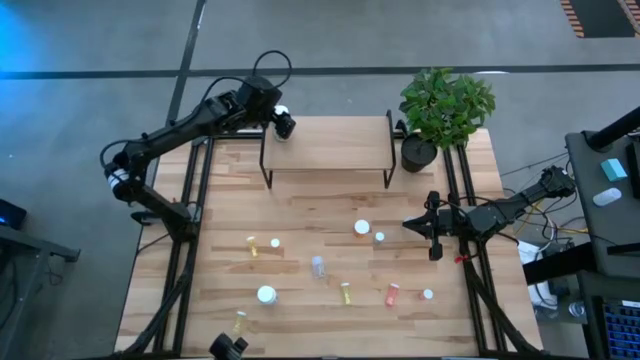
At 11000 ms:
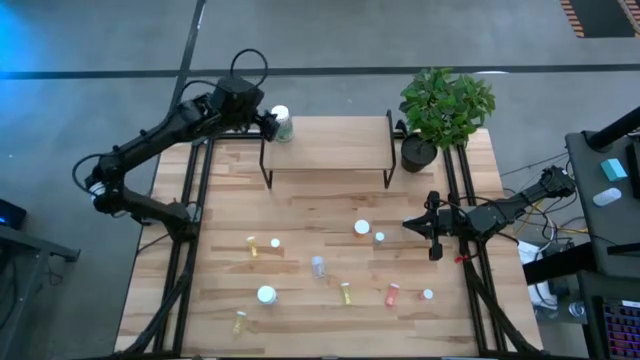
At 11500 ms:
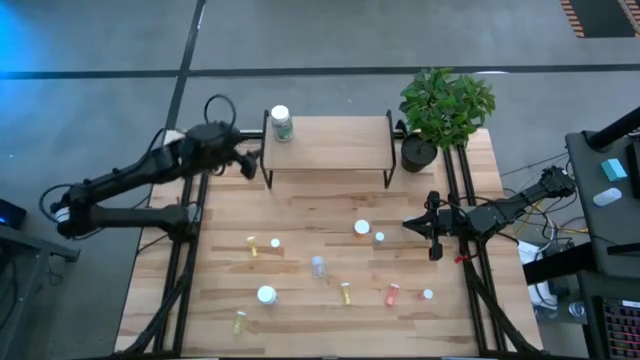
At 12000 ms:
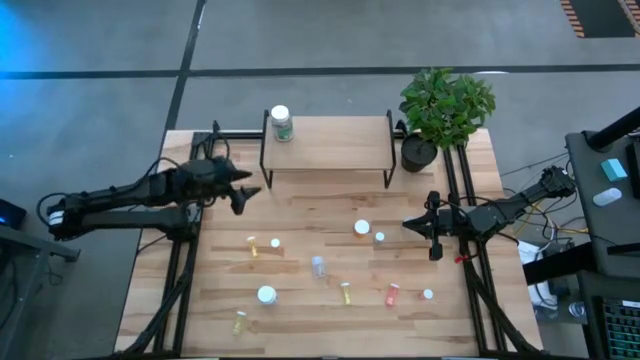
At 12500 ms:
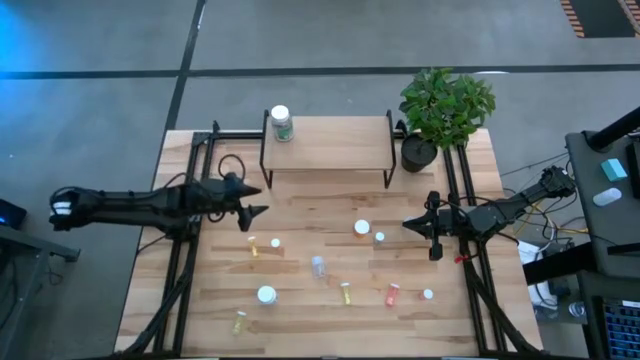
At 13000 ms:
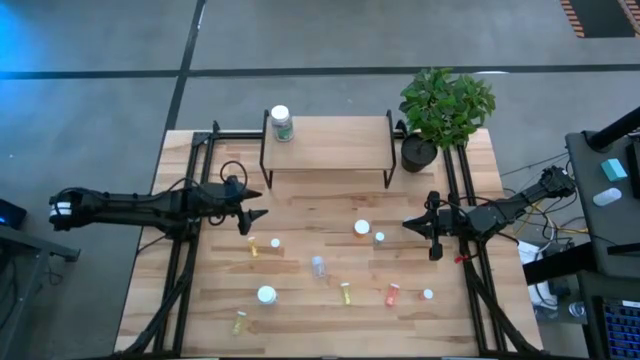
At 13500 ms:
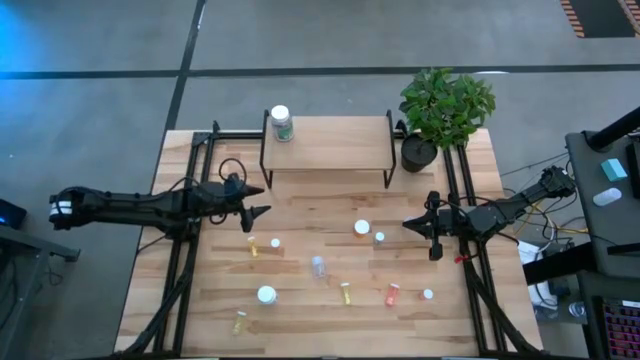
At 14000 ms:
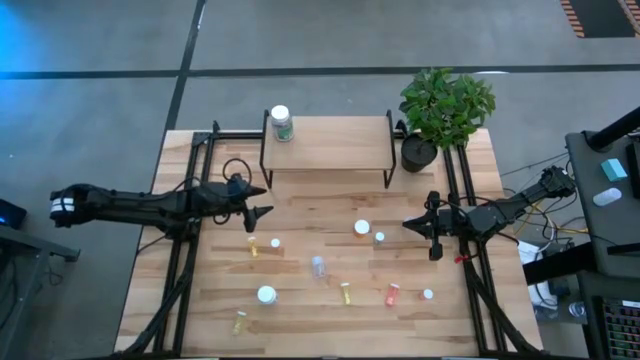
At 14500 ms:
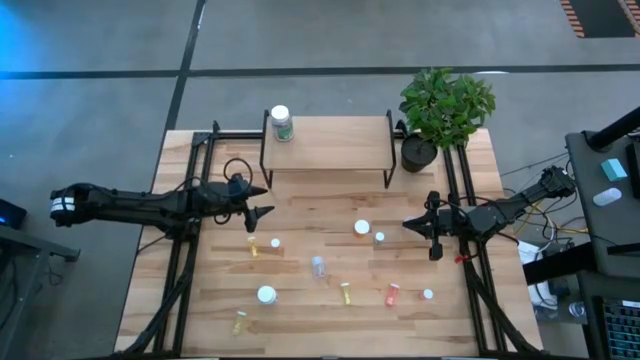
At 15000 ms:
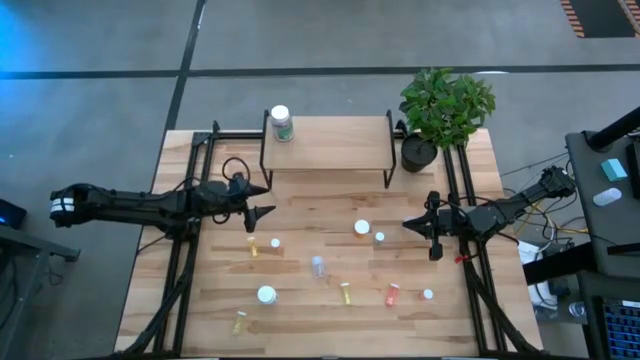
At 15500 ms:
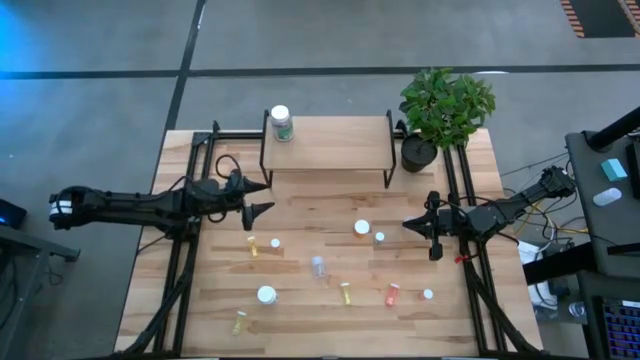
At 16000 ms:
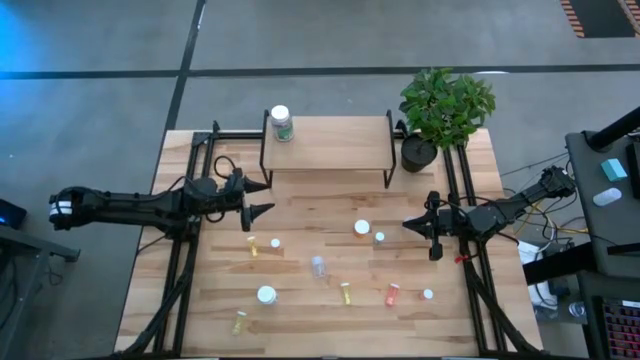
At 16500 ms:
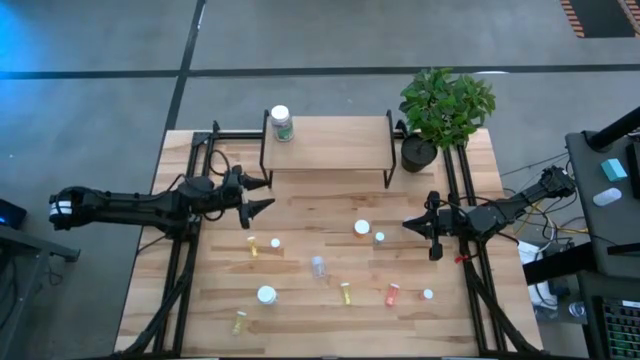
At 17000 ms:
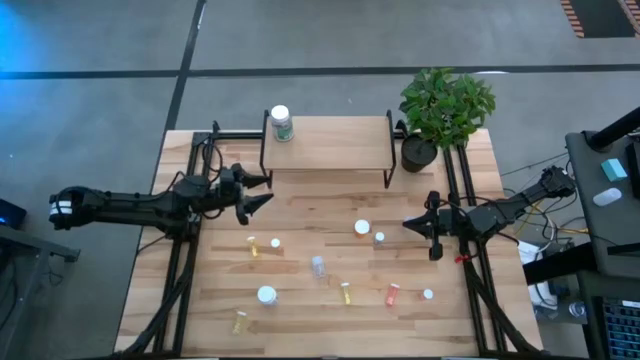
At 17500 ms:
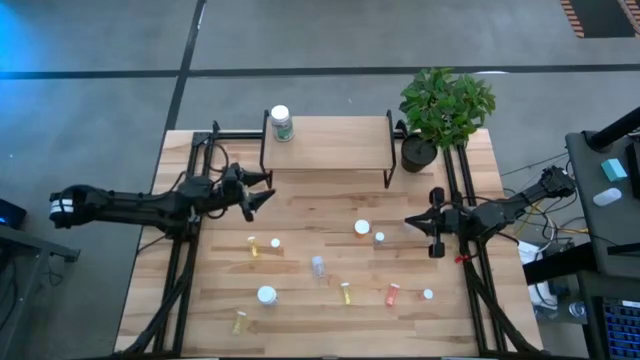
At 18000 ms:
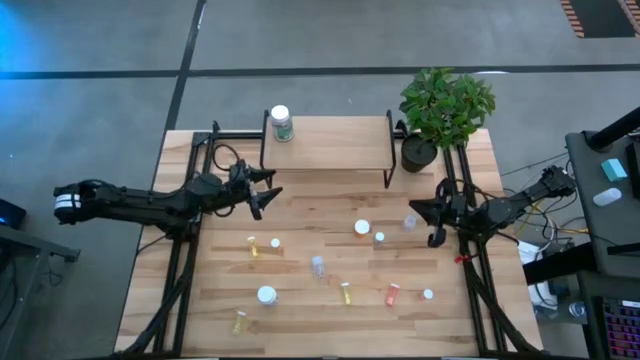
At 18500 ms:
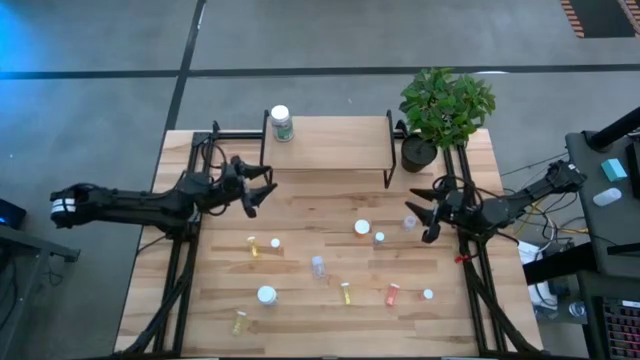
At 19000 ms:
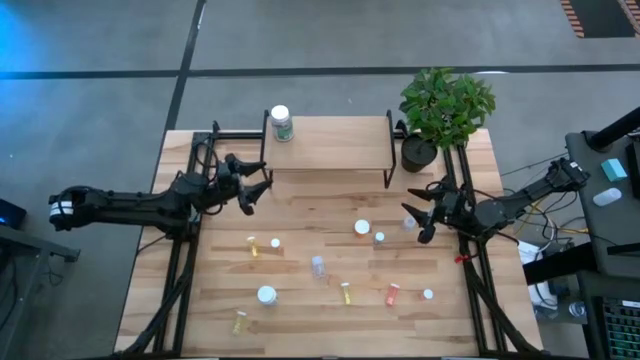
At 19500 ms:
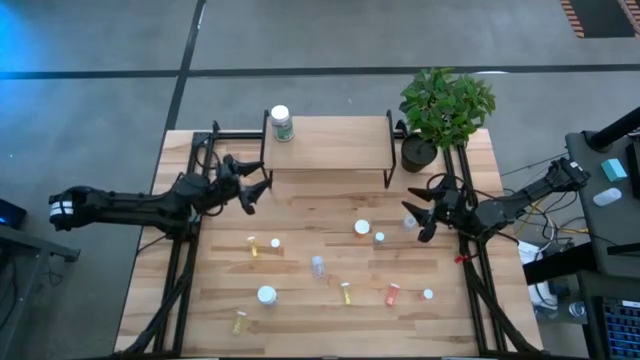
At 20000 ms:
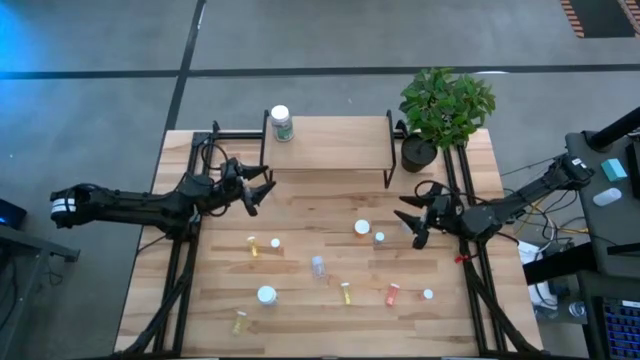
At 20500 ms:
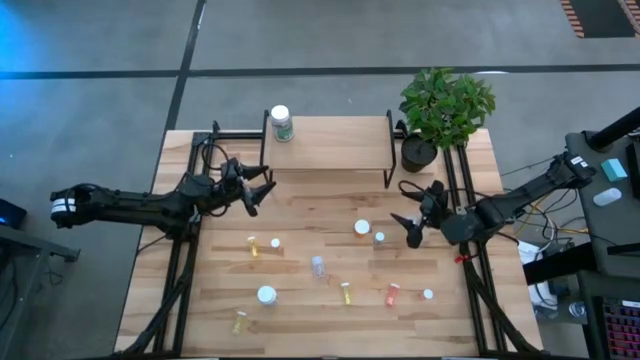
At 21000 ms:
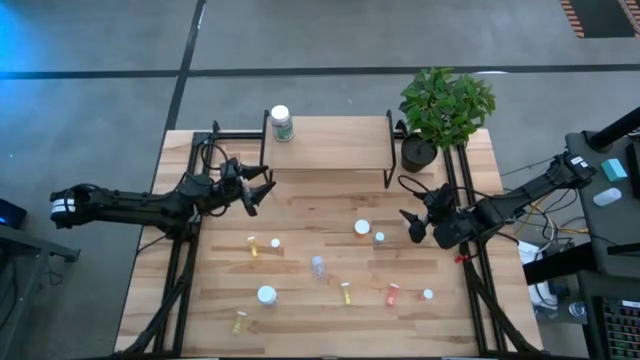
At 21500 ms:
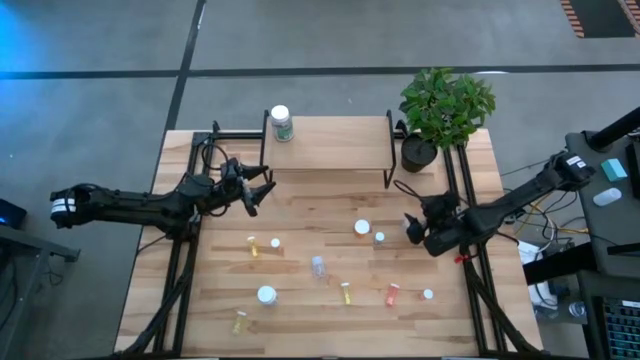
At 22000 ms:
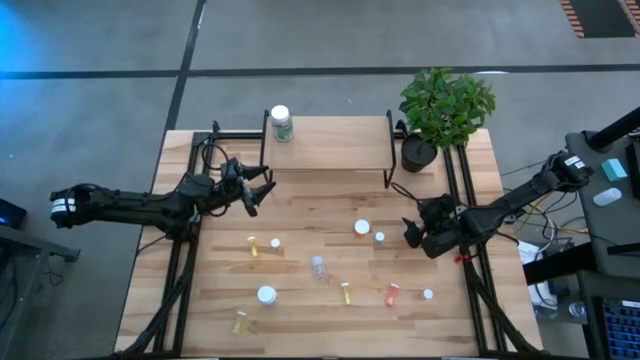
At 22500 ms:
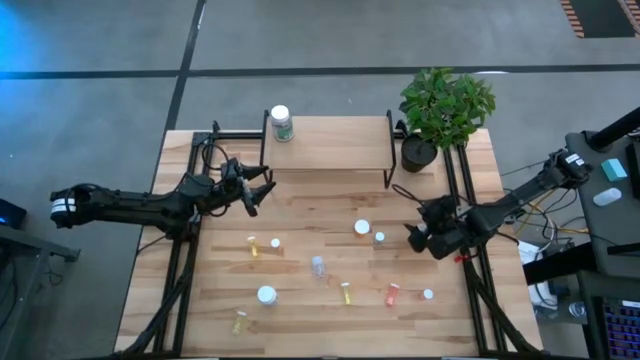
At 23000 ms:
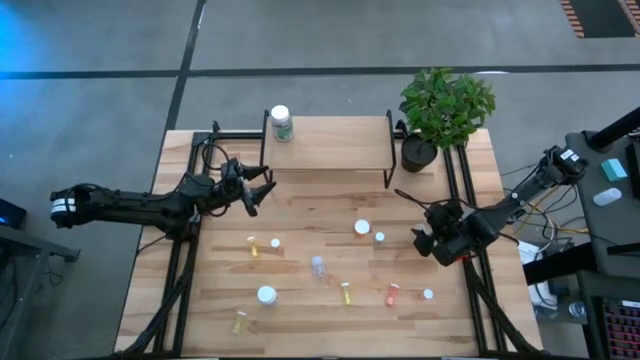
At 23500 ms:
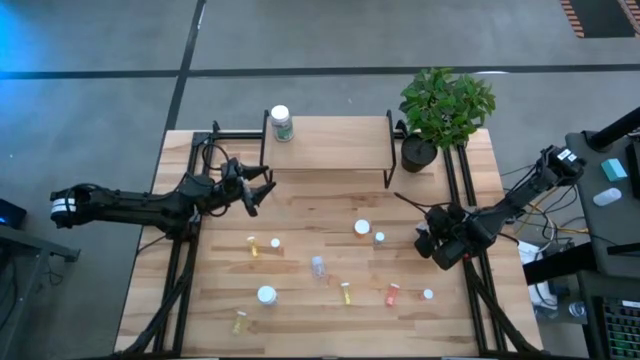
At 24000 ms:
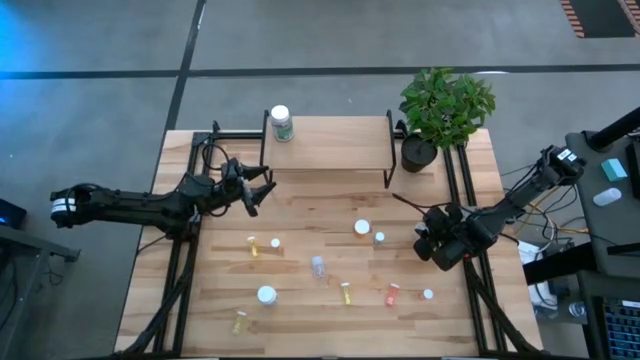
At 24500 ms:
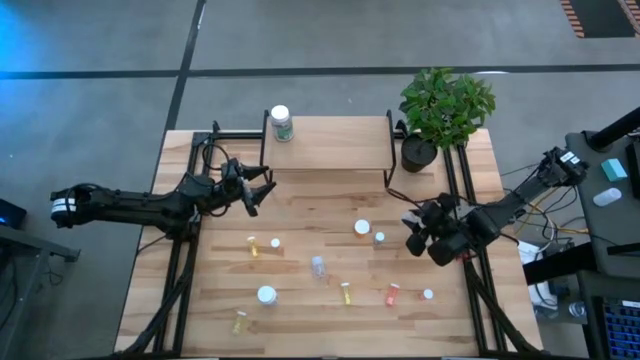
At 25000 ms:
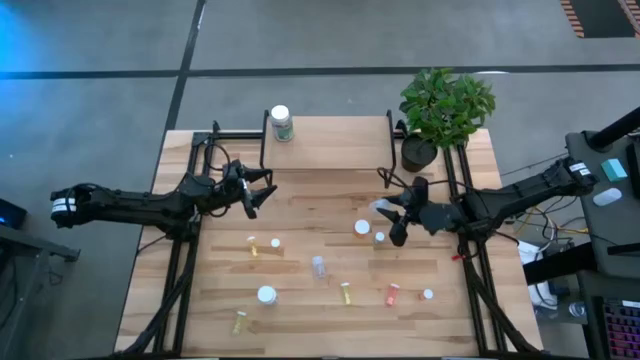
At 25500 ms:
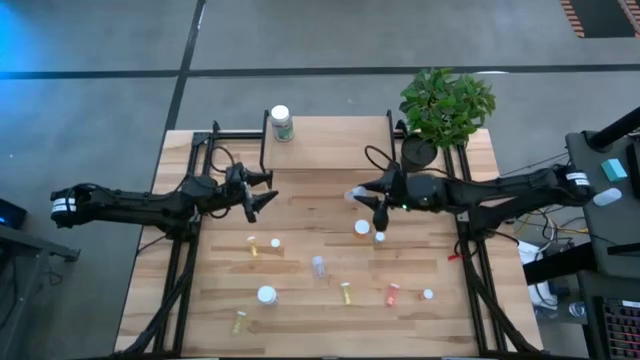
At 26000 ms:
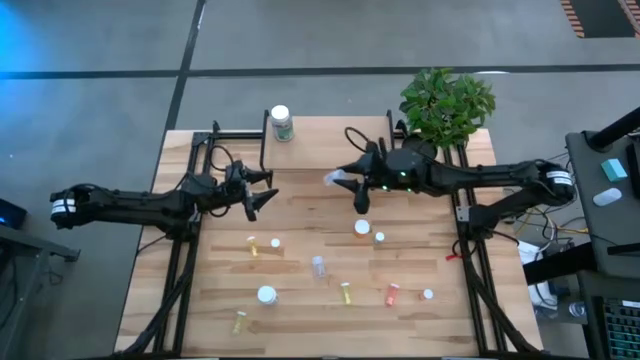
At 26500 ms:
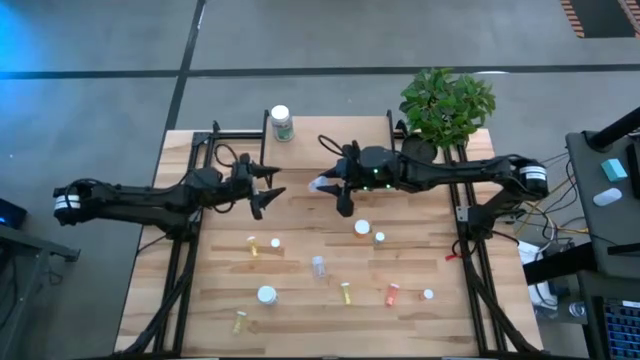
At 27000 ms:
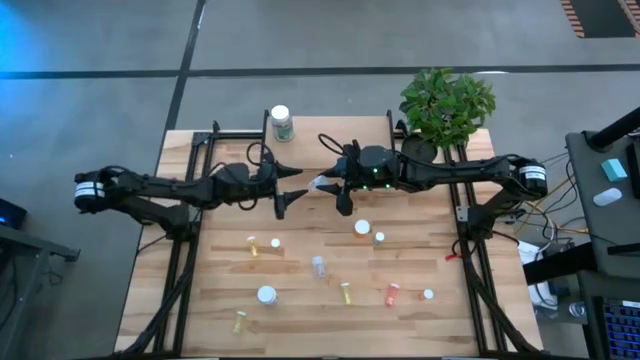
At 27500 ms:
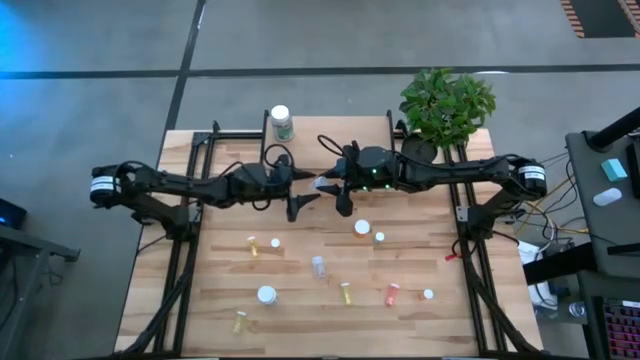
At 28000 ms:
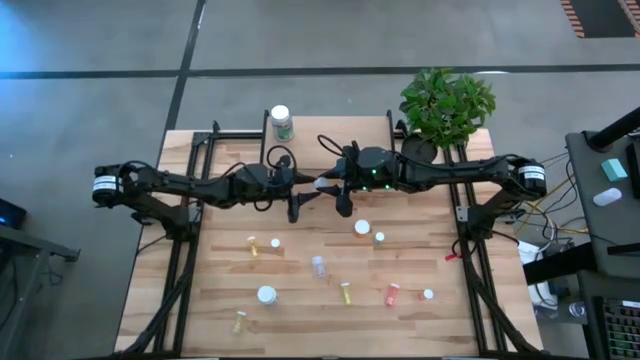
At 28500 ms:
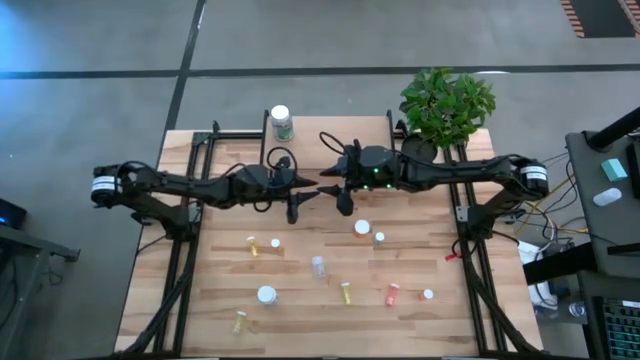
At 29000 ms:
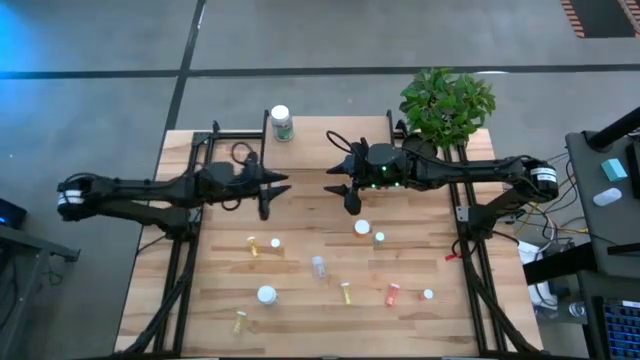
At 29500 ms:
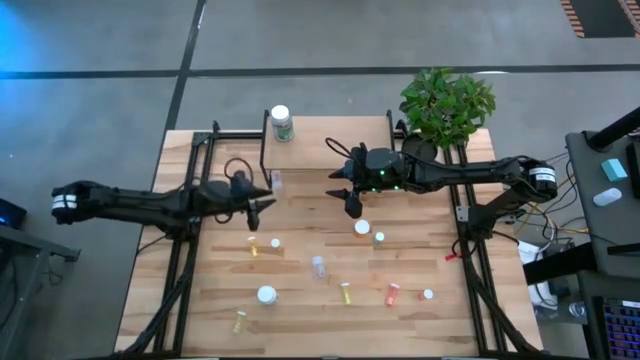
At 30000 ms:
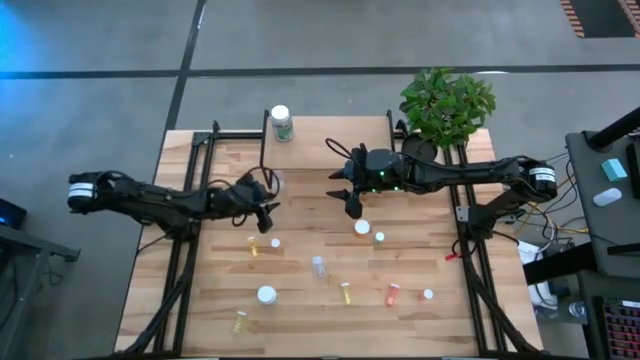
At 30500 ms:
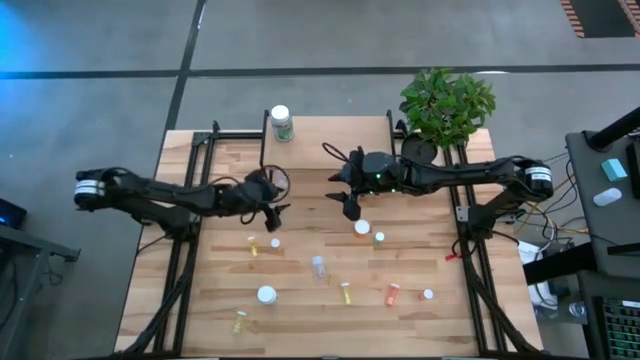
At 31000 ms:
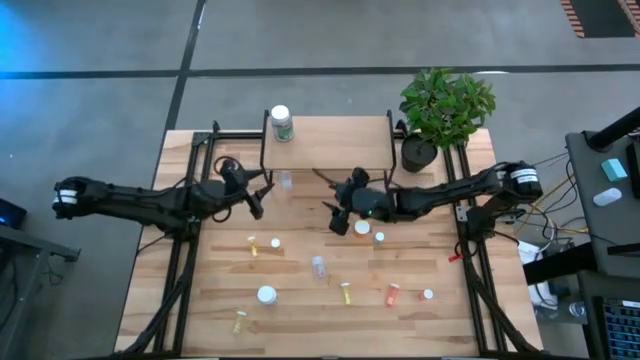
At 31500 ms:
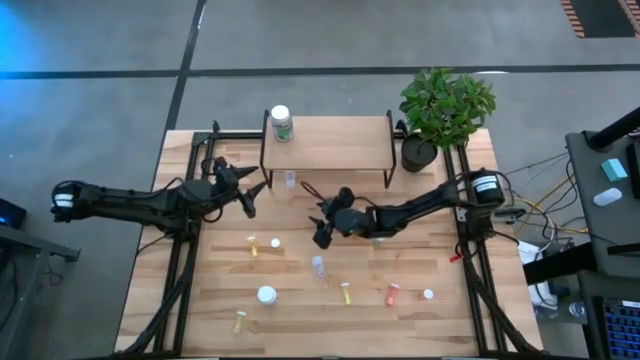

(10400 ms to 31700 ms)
Task: Pick and place medicine bottles onto shelf by color
Put the transparent pill bottle on the shelf
